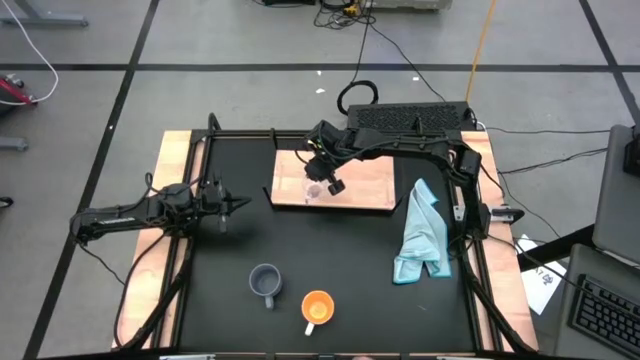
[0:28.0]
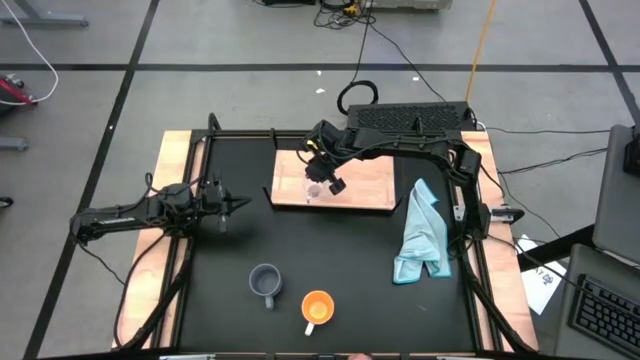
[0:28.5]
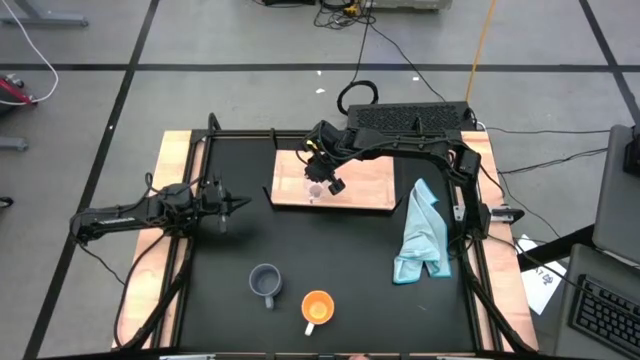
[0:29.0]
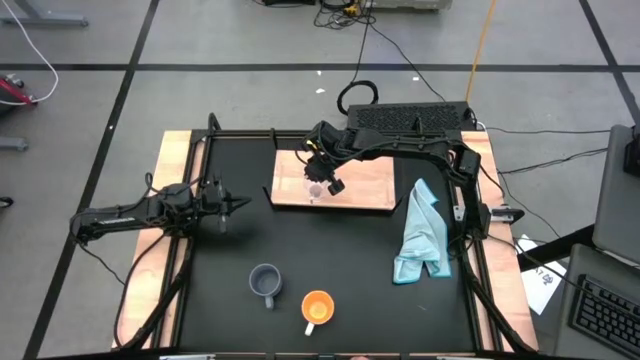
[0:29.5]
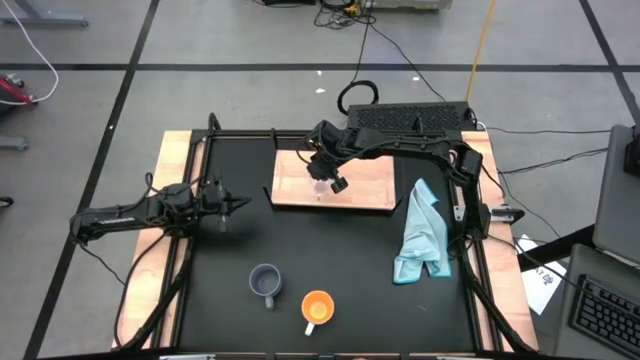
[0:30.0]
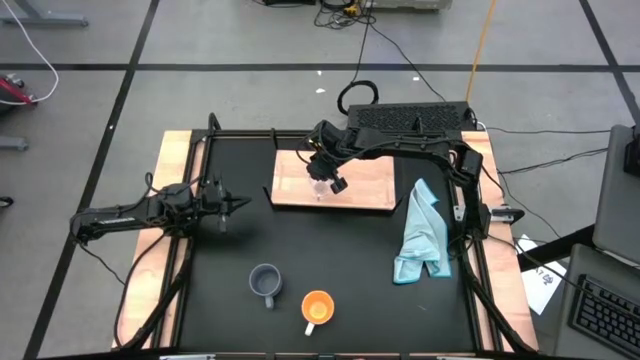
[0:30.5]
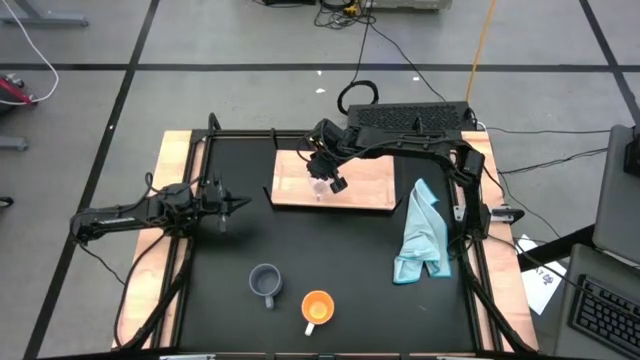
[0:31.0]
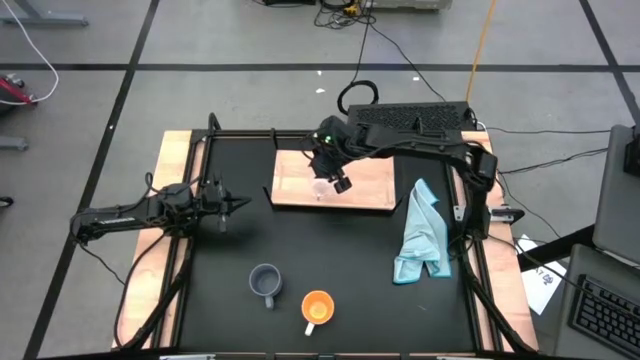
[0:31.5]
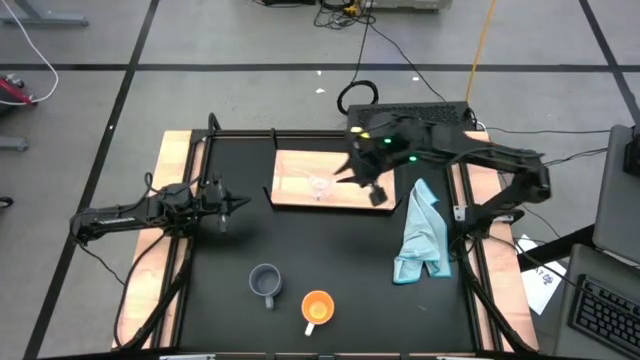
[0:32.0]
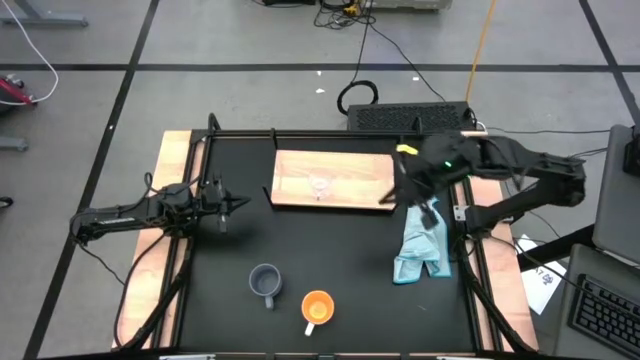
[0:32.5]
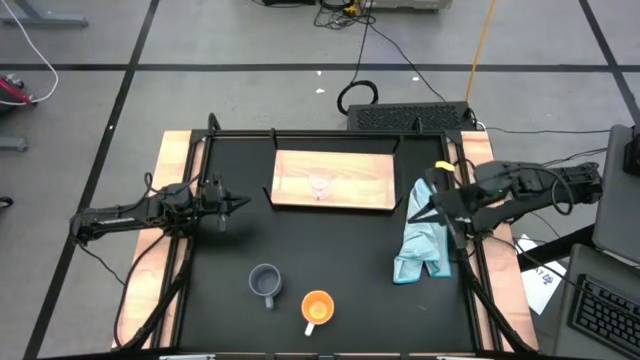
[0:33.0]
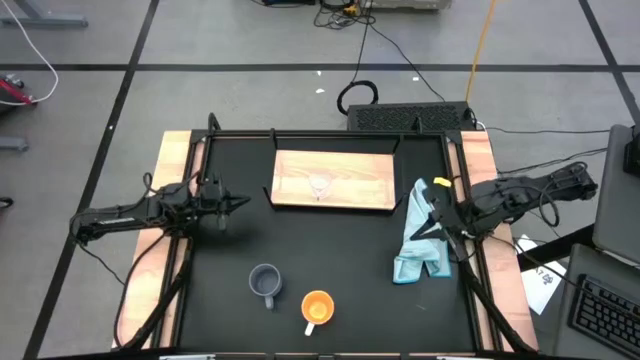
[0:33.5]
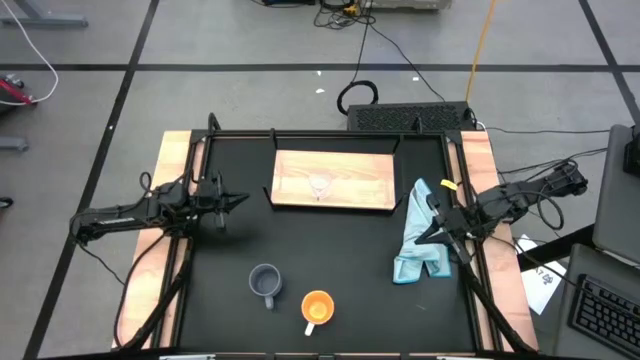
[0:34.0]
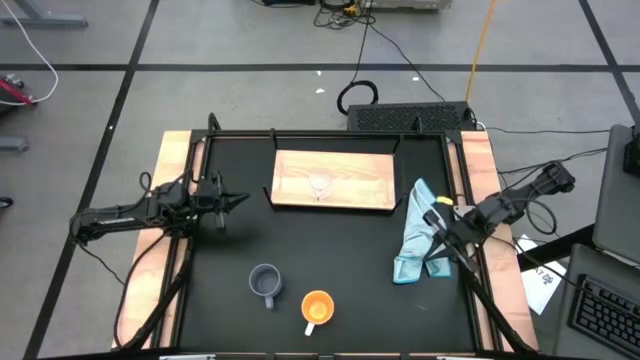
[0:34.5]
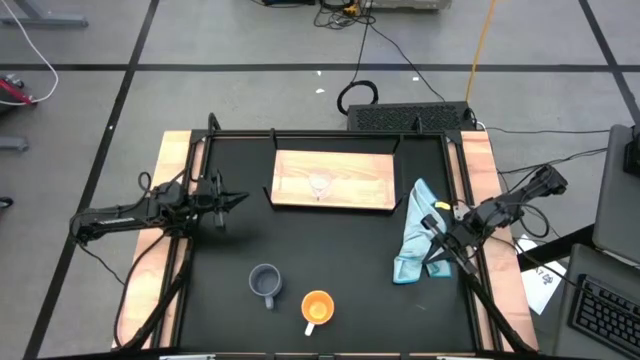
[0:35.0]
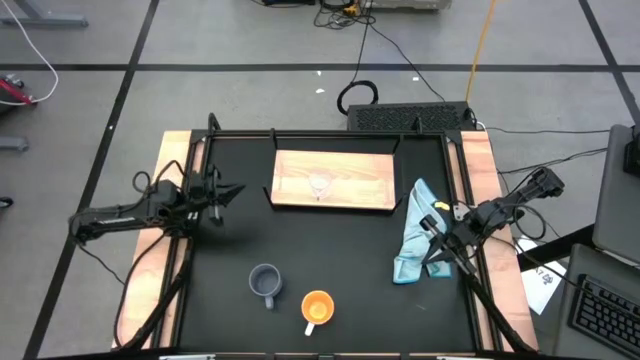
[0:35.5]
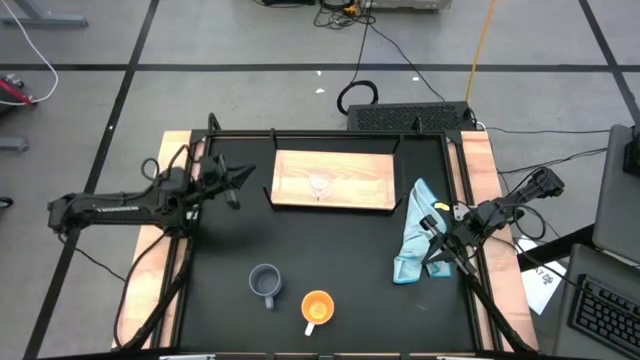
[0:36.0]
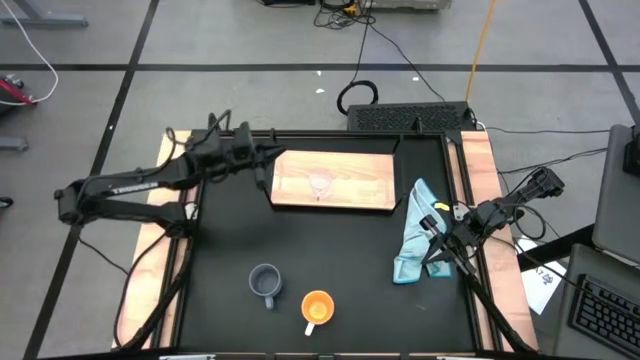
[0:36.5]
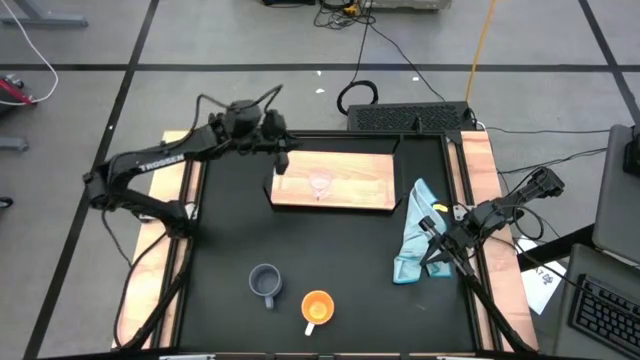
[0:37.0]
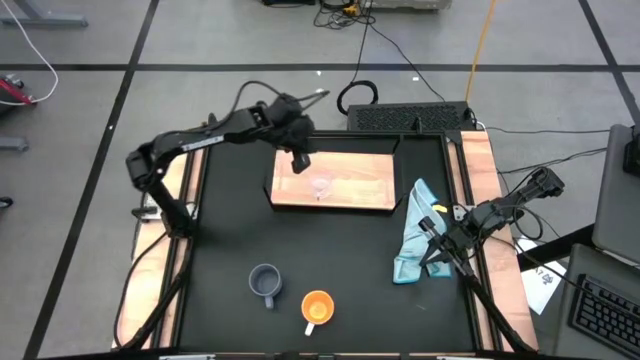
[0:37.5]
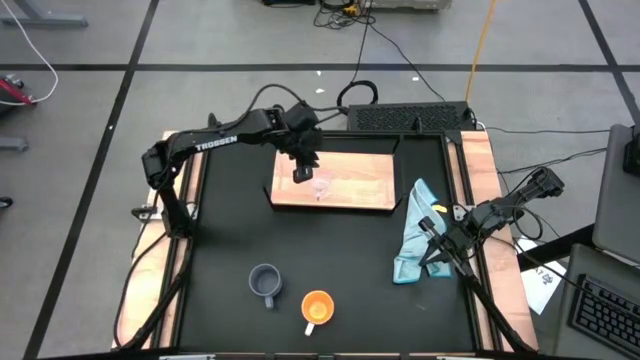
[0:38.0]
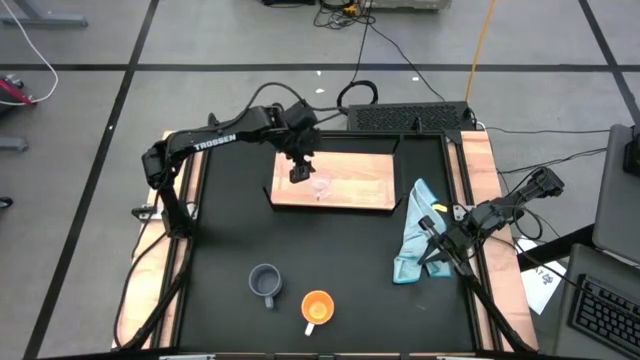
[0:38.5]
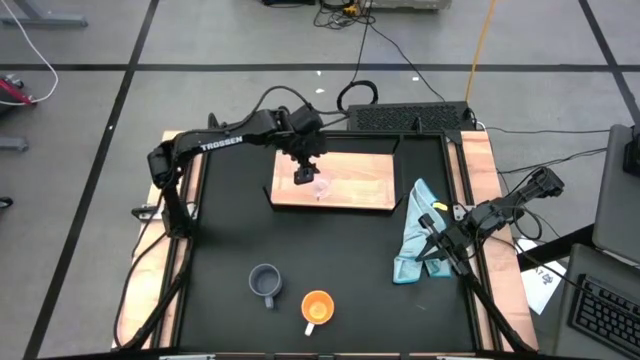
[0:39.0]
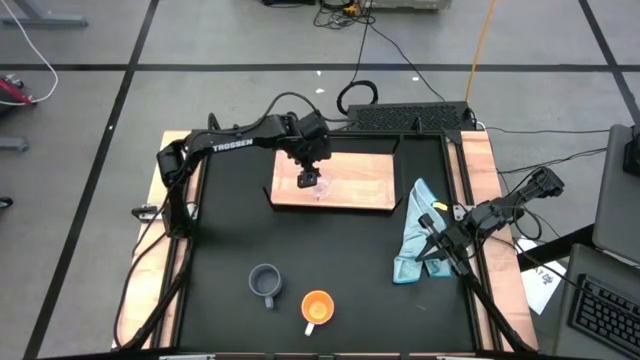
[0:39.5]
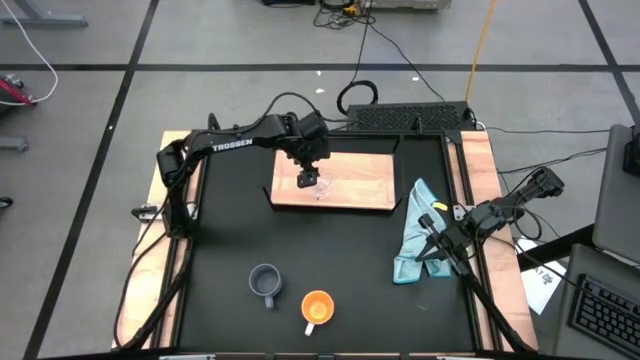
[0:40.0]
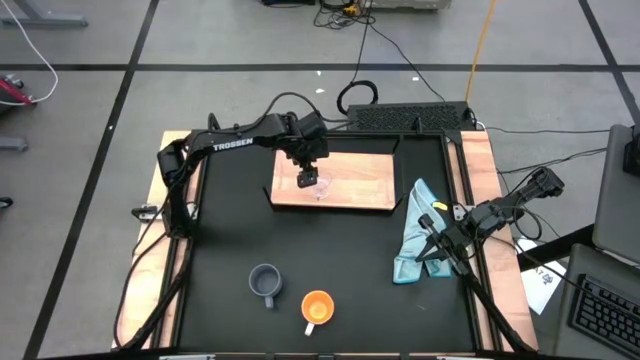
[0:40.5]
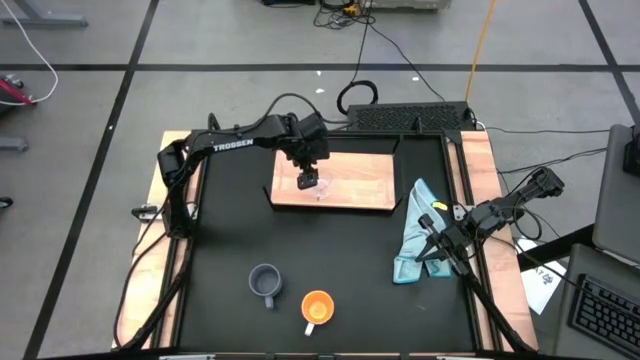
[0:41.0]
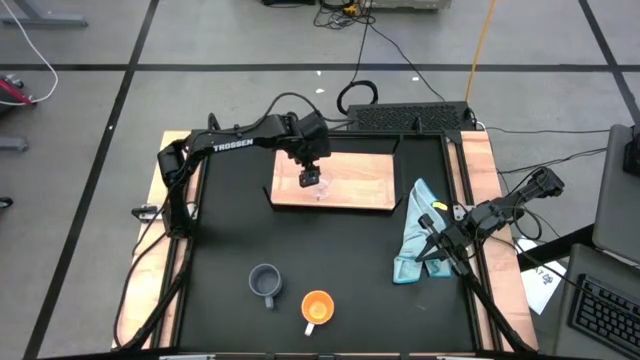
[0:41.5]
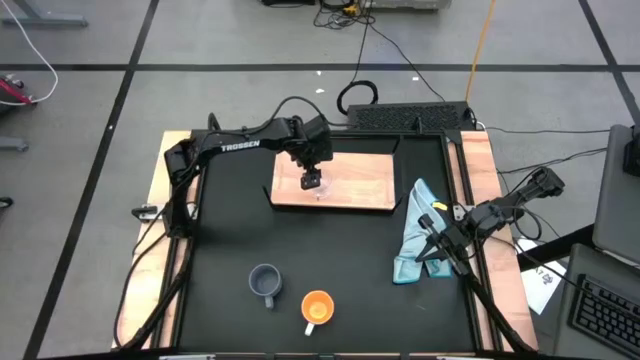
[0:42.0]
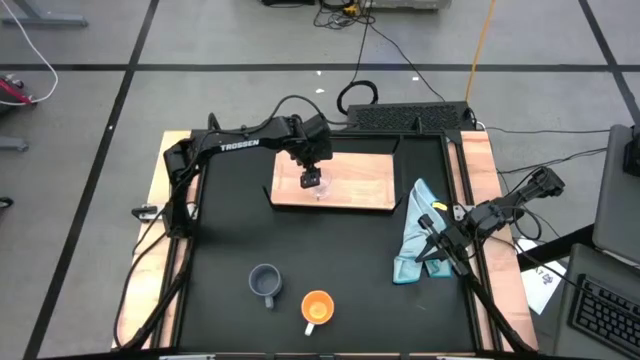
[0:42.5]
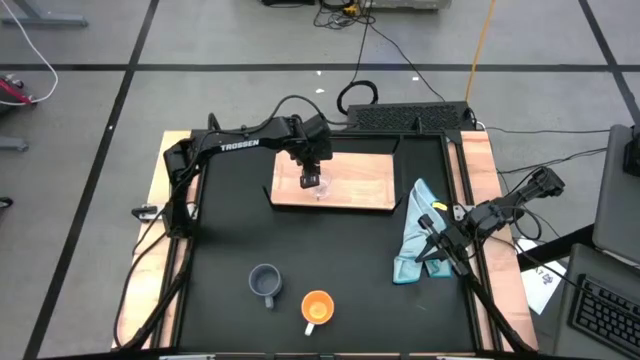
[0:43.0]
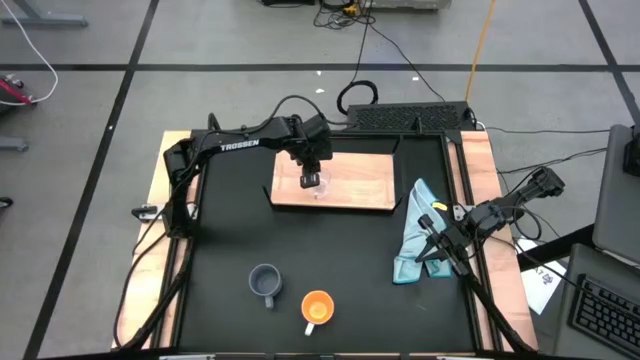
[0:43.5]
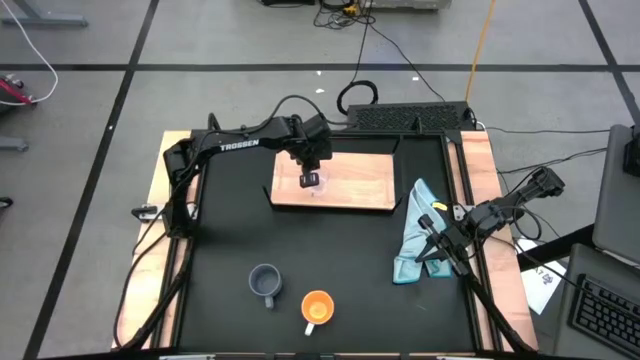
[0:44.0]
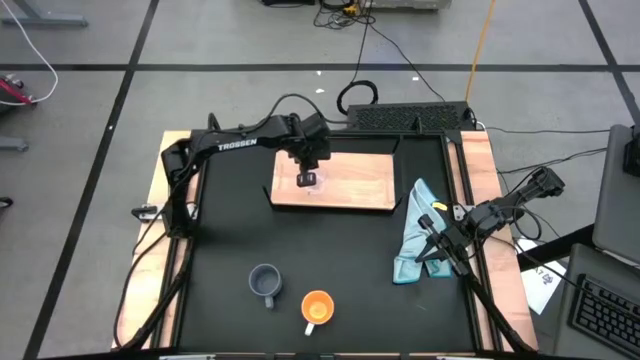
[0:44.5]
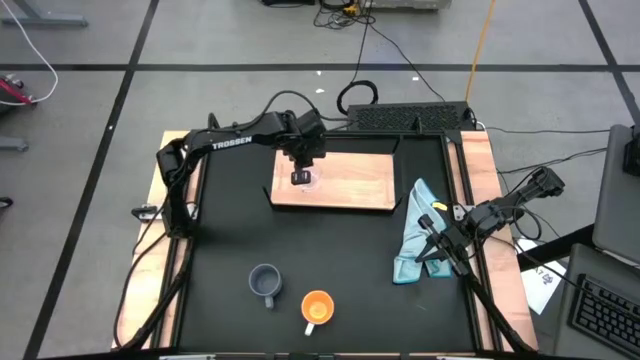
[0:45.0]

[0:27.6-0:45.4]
Task: Stack small to large cups/mugs on shelf
Put the transparent mug on the shelf

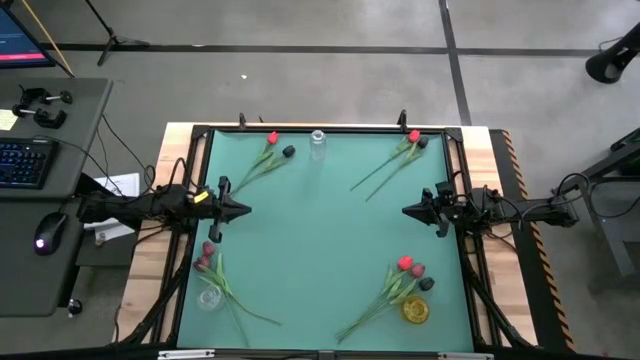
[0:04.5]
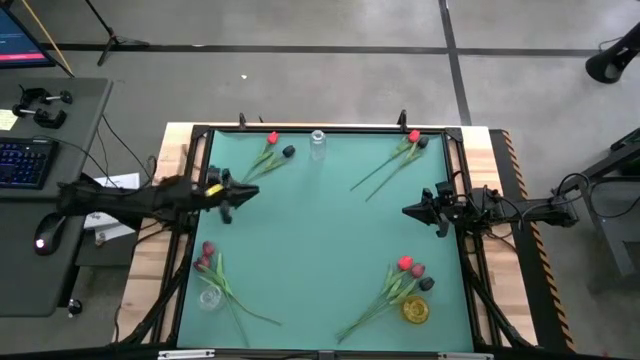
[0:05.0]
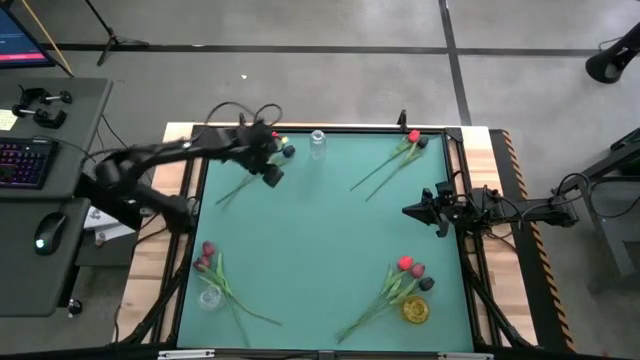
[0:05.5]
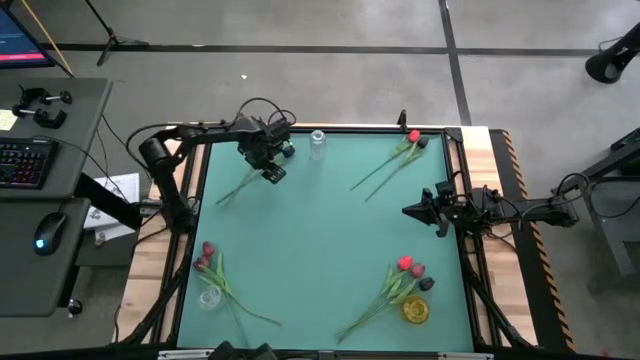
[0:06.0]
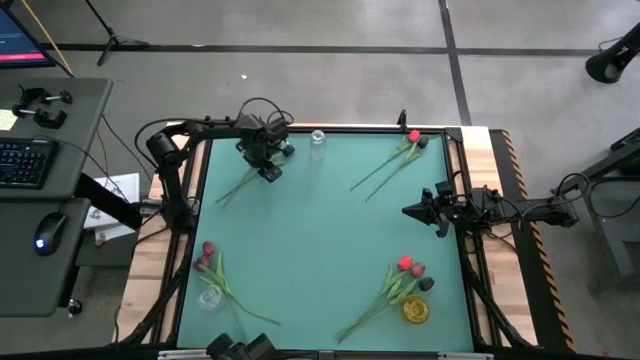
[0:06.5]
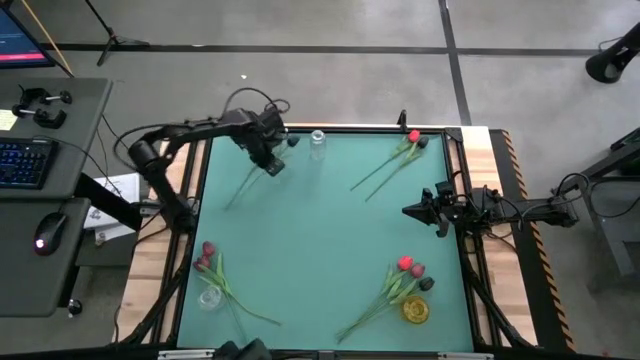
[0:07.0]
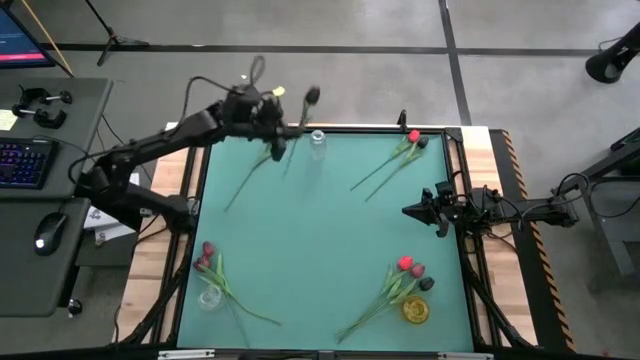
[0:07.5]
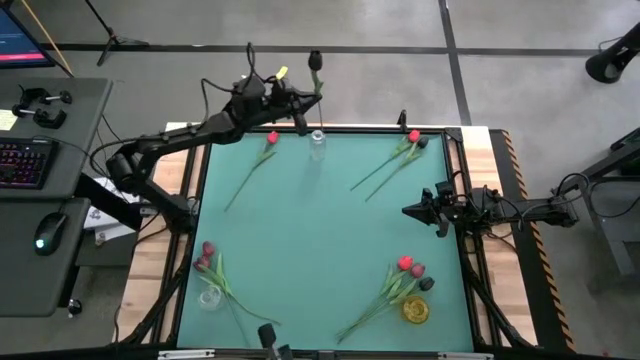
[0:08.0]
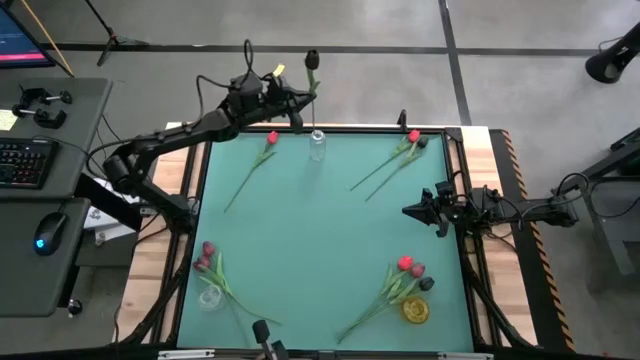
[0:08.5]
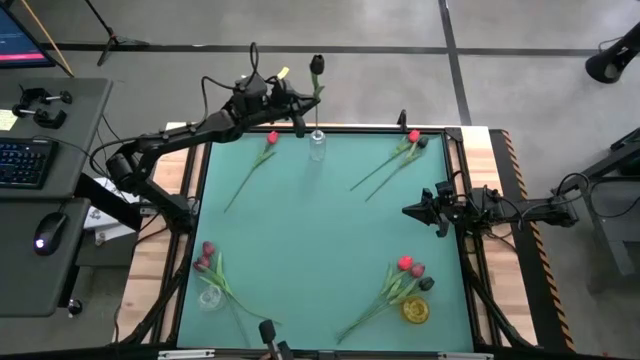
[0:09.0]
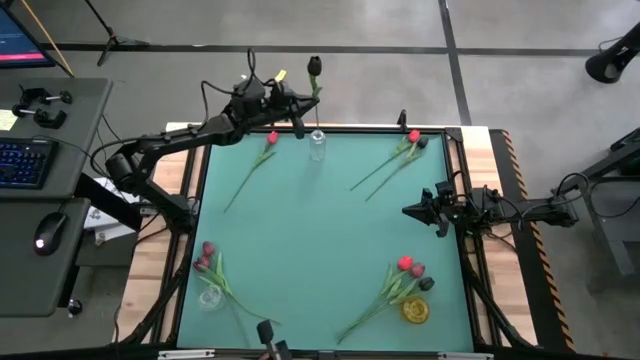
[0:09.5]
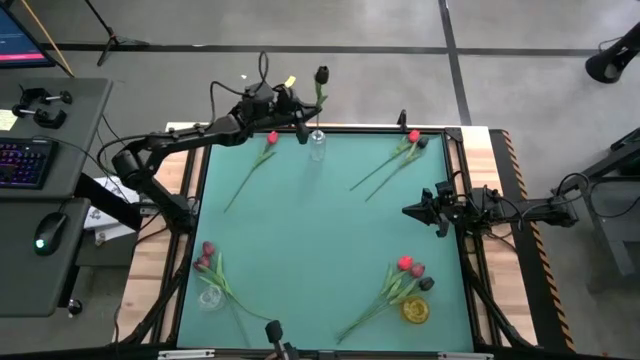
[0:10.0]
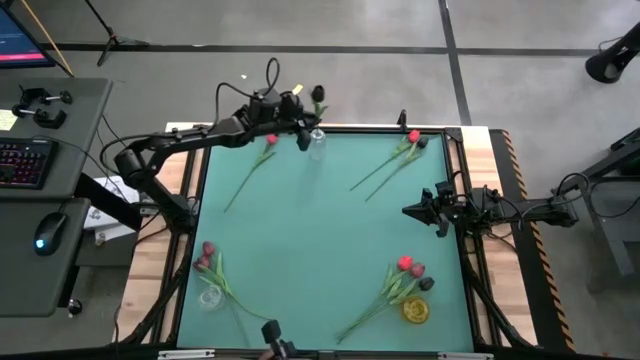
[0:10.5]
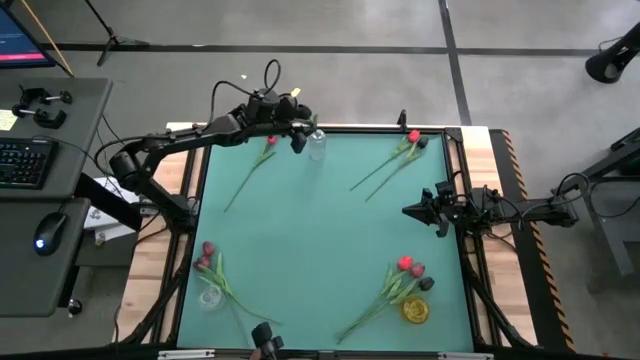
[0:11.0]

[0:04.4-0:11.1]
Task: Sort flowers into vase by color
Put the top left black tulip into the top transparent vase
